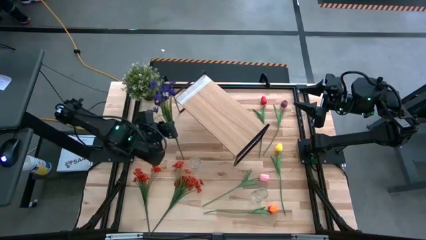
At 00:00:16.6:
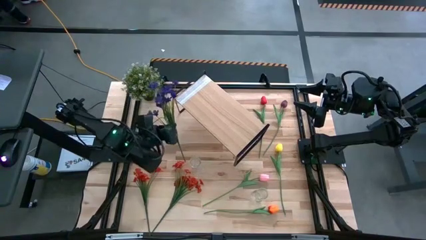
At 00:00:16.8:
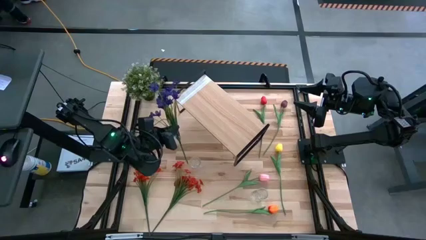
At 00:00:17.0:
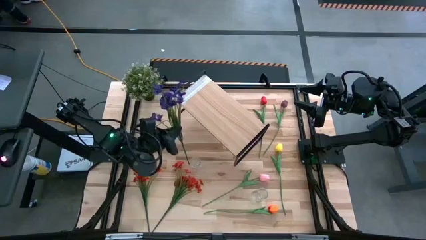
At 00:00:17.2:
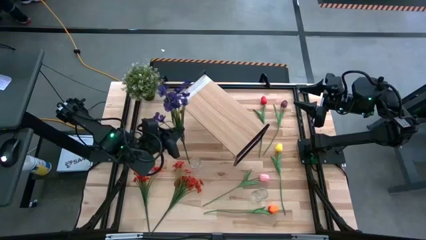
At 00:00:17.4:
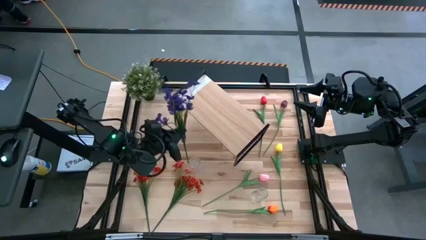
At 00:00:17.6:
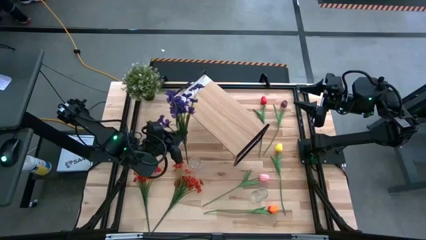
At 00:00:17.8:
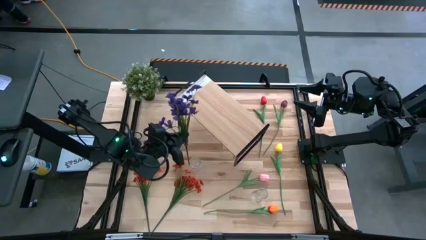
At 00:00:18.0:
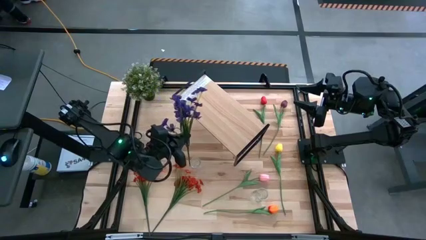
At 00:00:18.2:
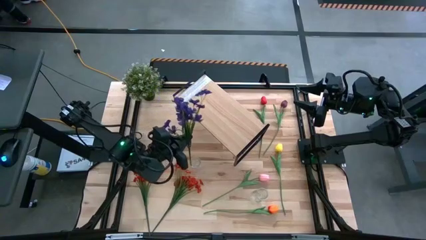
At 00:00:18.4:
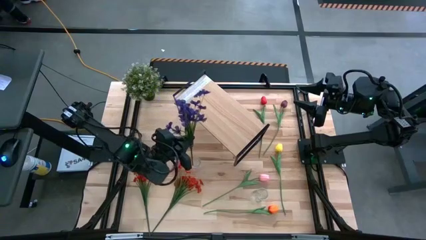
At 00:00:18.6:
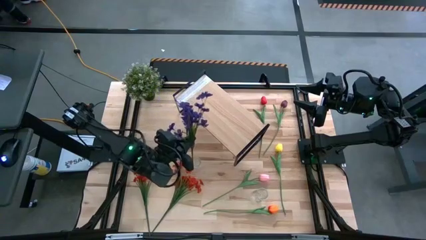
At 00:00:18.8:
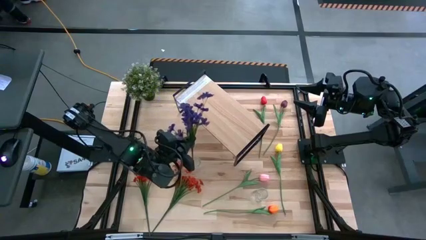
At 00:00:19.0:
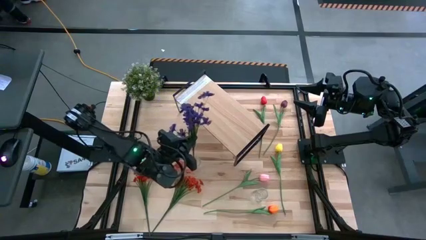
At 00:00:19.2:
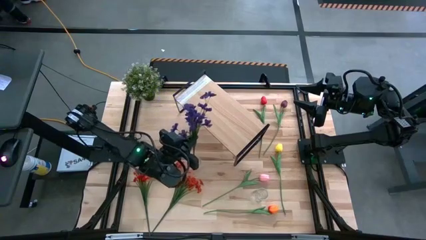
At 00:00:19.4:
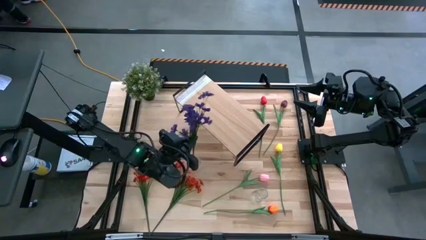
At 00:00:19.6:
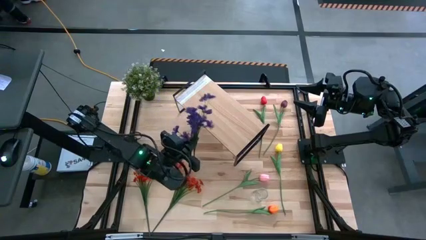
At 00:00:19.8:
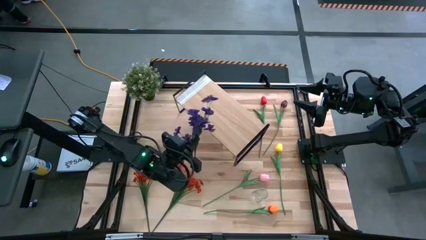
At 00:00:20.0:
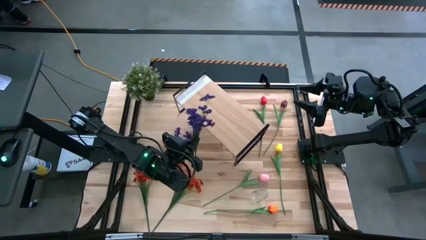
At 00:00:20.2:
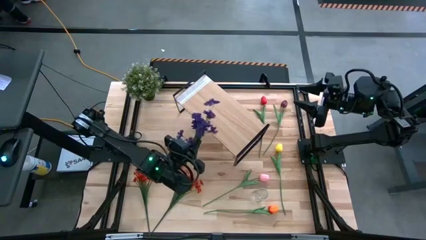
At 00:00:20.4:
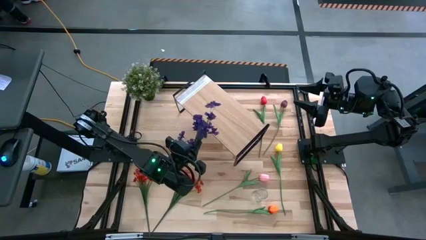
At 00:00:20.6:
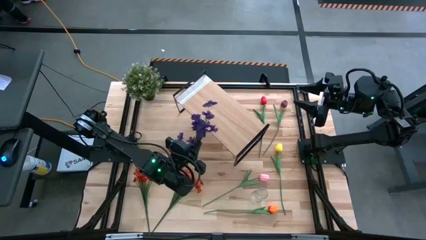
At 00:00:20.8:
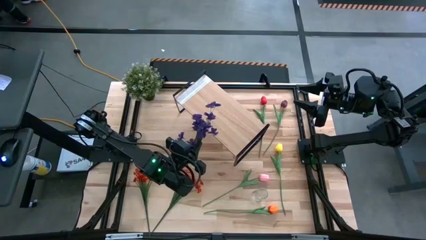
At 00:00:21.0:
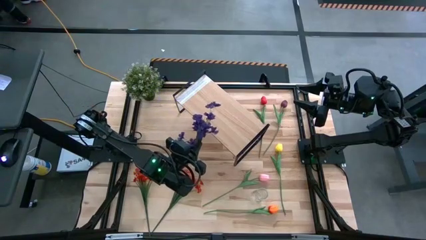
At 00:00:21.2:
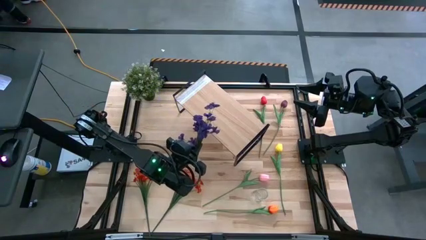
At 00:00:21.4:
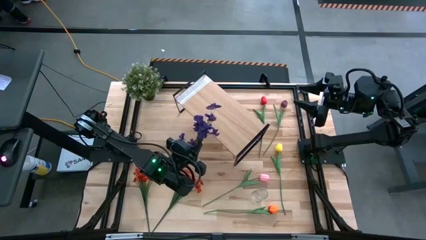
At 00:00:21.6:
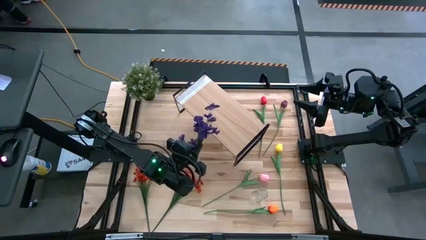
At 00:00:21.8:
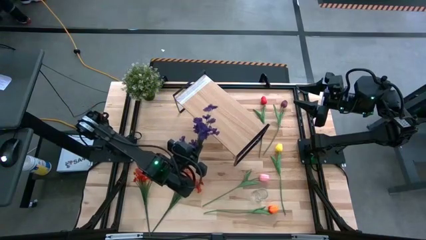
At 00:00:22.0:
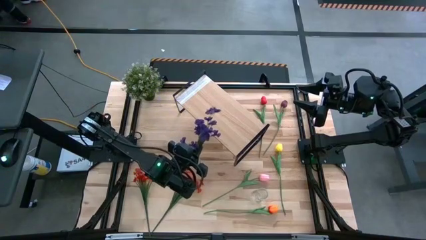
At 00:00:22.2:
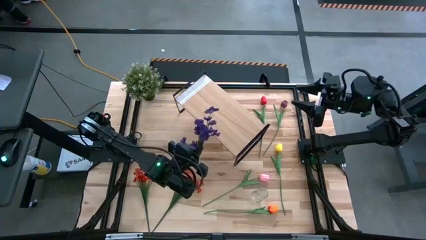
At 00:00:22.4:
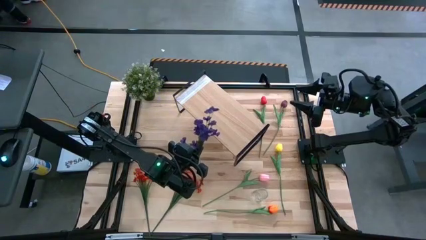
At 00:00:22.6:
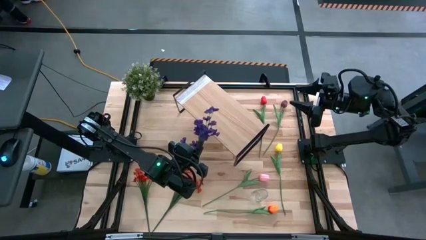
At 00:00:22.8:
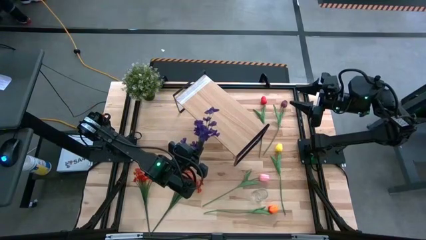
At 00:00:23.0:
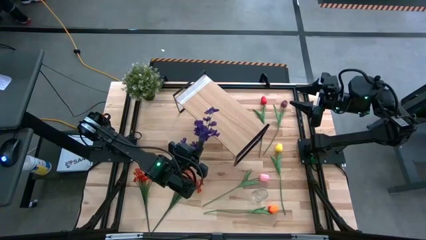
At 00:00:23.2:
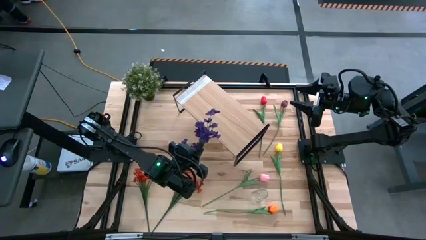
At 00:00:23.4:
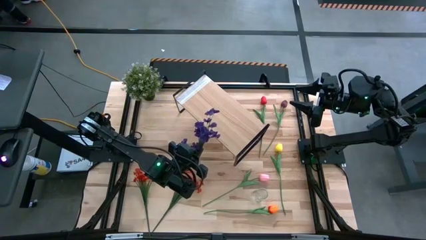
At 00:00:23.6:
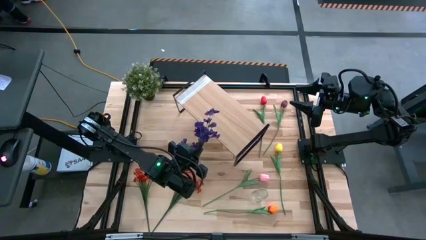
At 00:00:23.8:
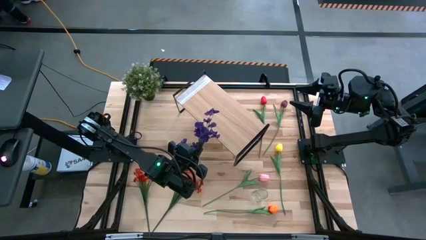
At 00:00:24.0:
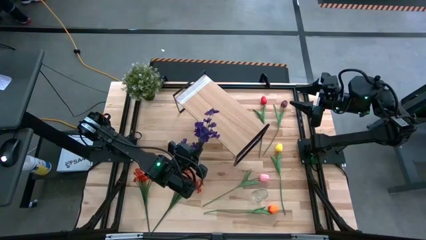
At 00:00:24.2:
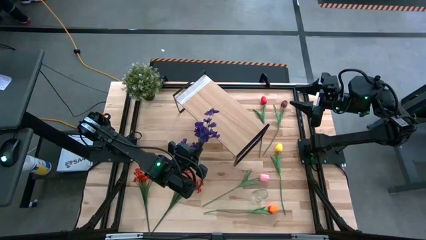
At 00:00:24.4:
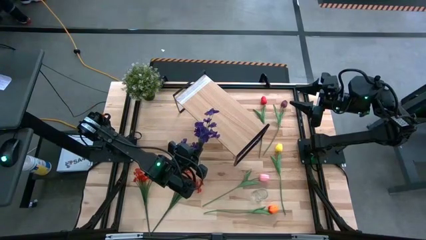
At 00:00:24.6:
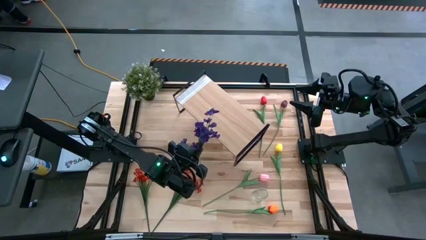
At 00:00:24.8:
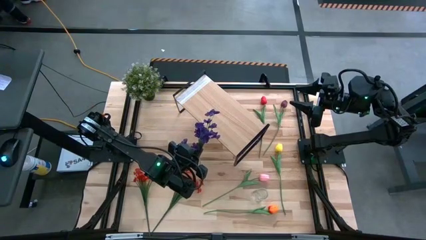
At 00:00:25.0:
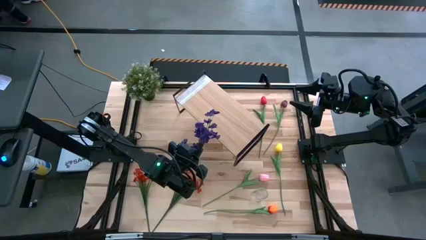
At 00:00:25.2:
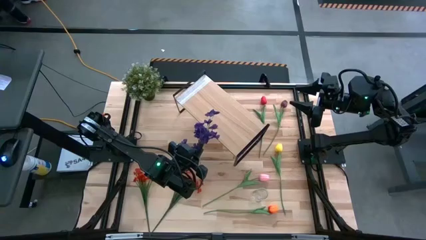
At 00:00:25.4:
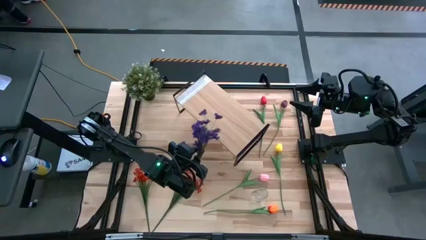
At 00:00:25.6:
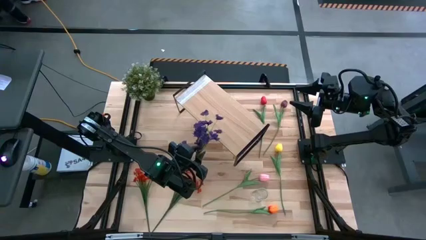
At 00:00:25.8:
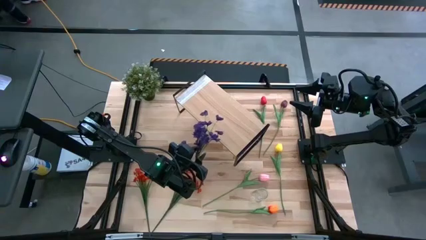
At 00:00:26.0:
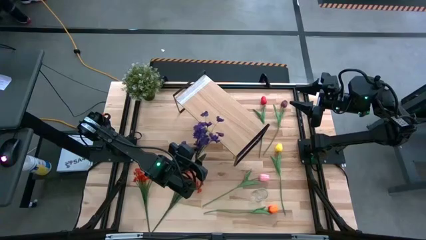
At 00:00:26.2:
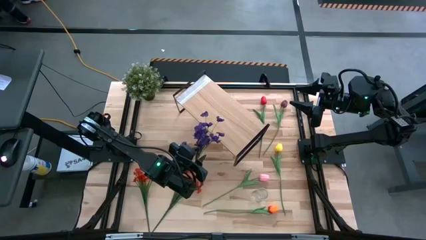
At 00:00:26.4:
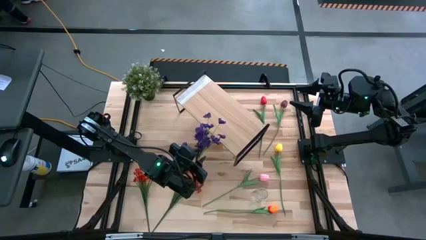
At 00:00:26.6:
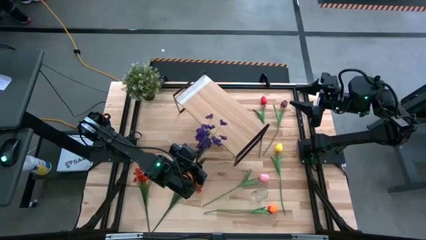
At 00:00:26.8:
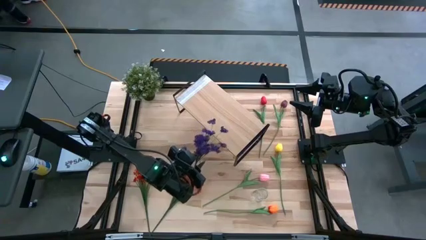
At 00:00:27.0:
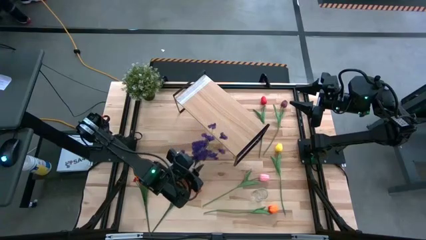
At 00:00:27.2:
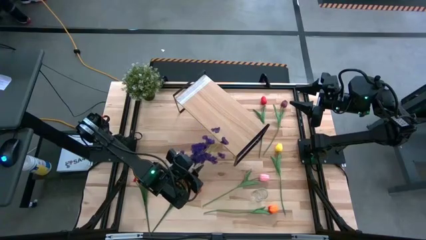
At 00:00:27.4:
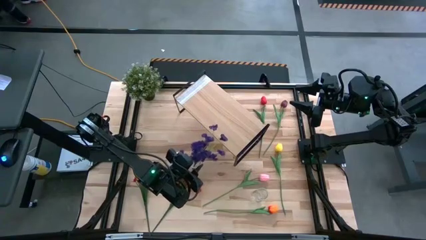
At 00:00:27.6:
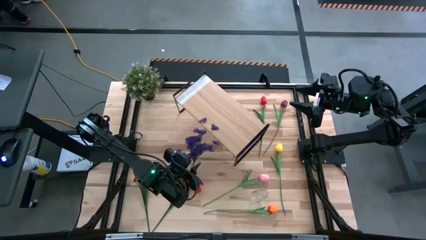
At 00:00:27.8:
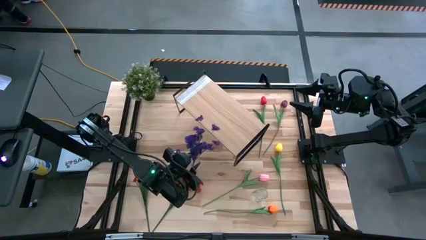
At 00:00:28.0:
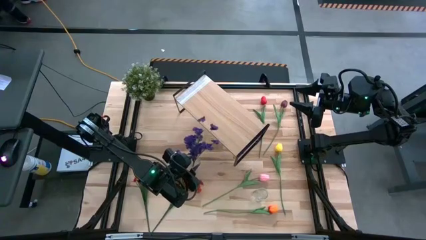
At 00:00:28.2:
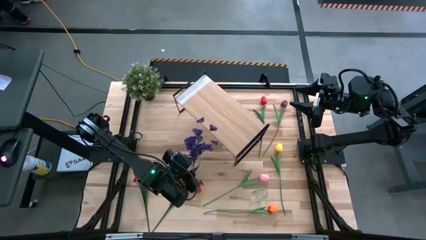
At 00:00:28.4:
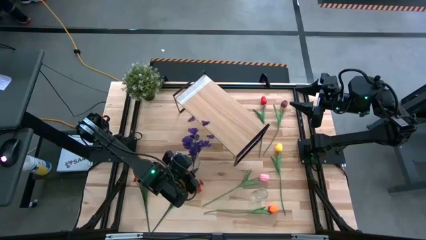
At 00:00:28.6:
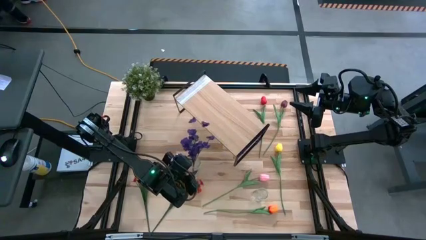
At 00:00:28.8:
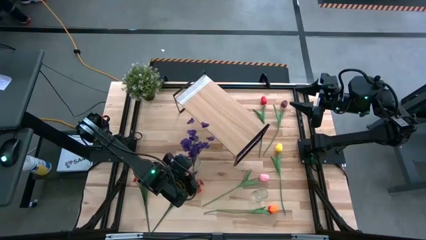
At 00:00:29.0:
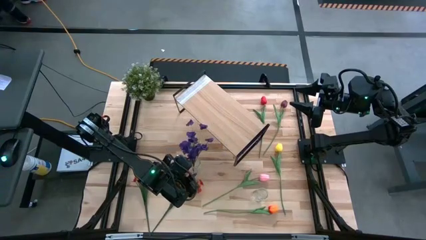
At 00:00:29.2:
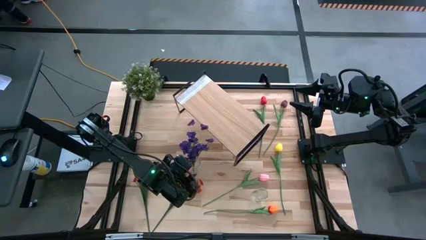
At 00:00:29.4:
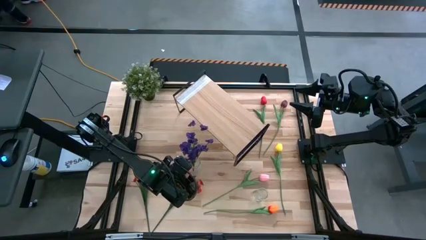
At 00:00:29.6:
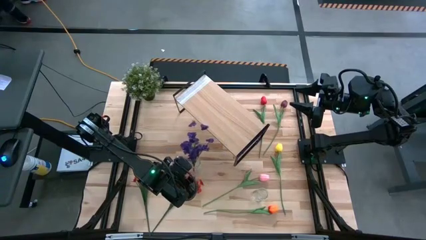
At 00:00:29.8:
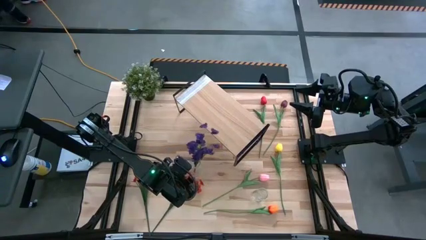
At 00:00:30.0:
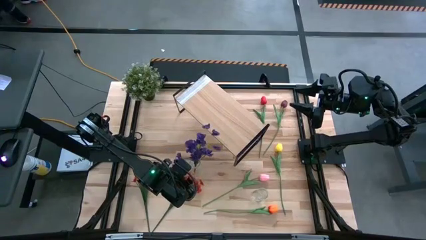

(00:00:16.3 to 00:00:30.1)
Task: Pick and place flowers into a vace then onto a shelf
Put the violet flower into the left transparent vase
